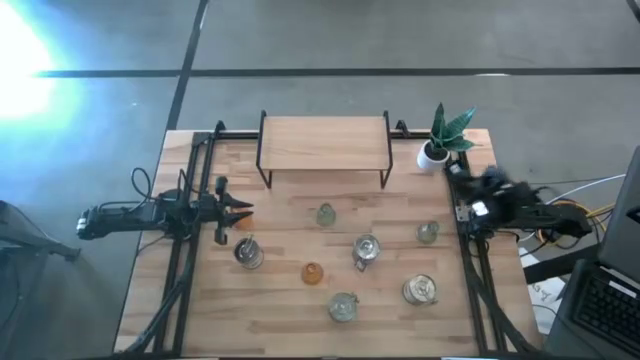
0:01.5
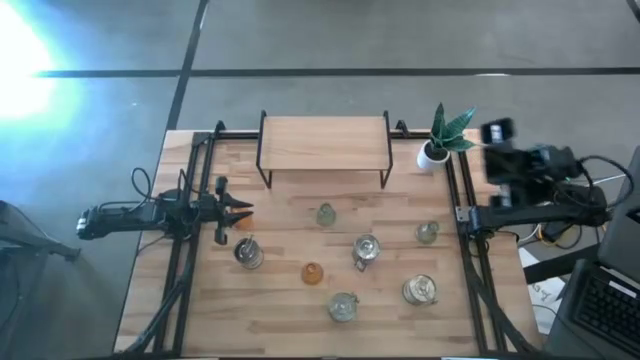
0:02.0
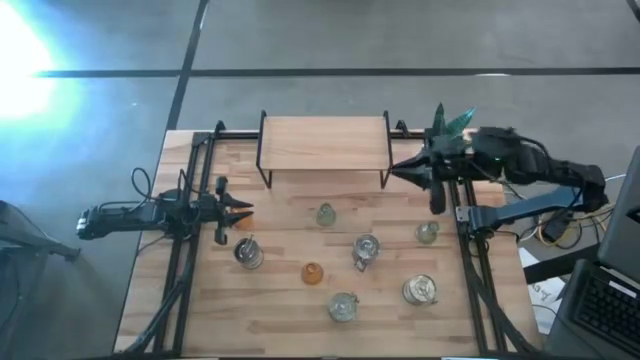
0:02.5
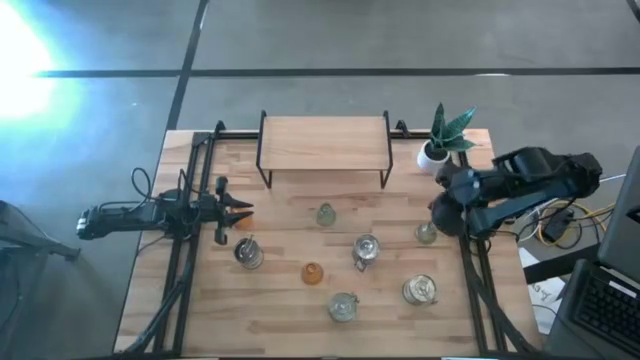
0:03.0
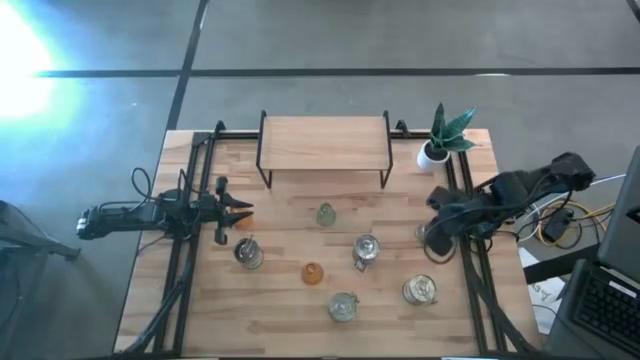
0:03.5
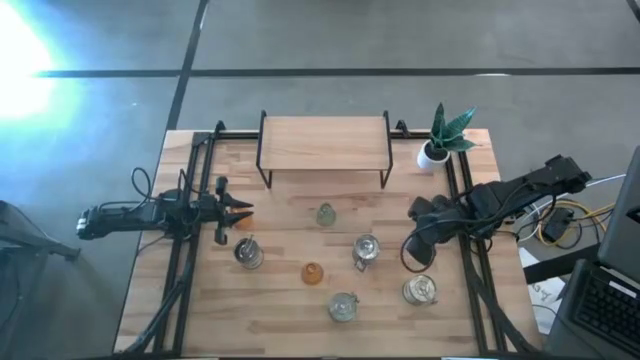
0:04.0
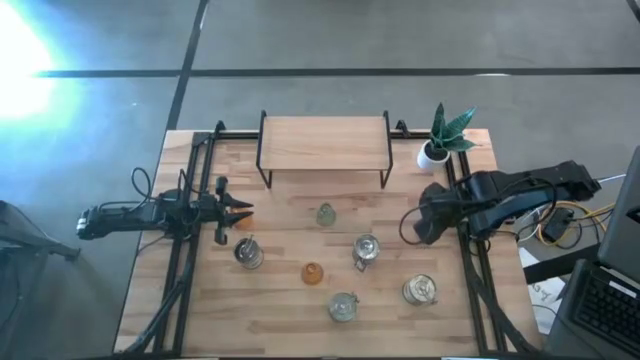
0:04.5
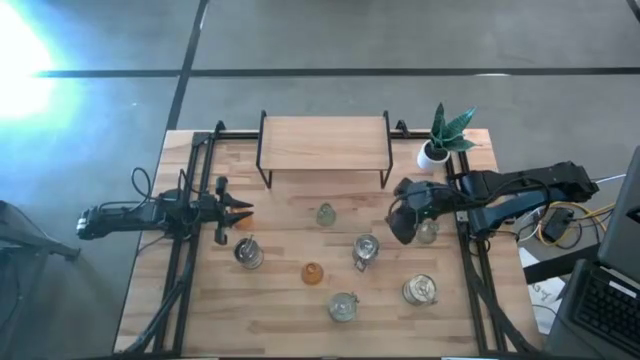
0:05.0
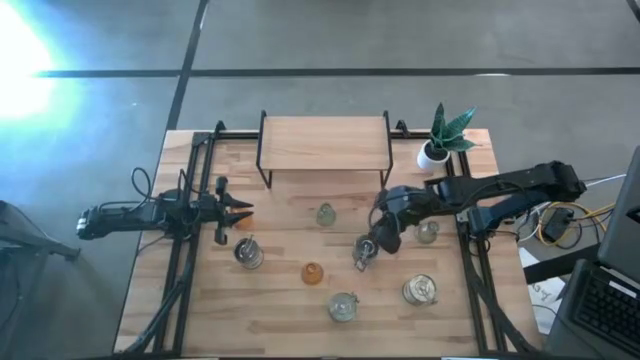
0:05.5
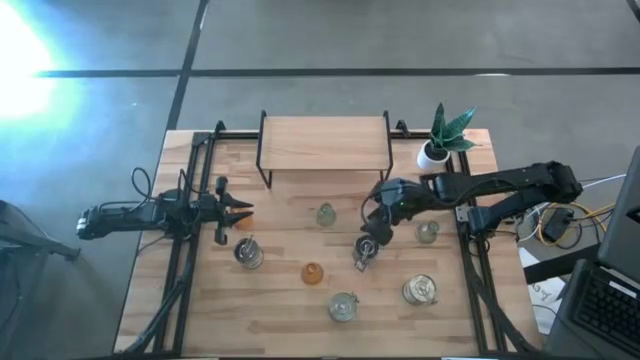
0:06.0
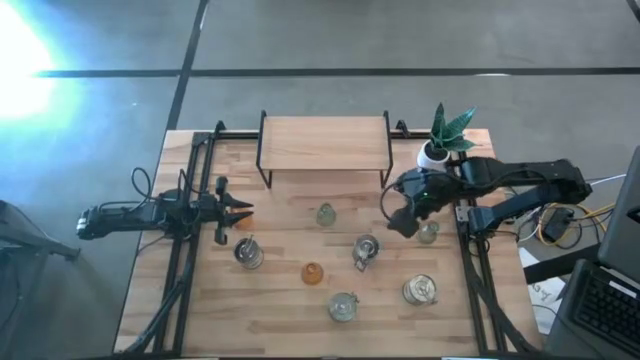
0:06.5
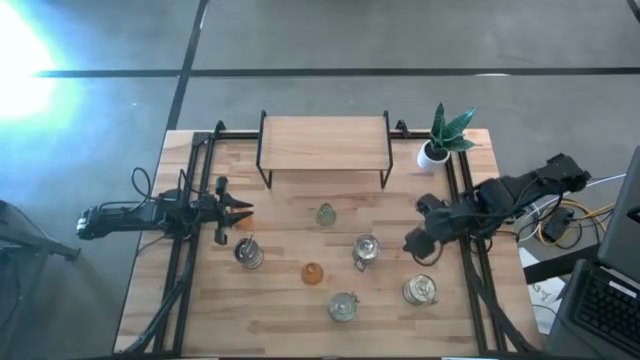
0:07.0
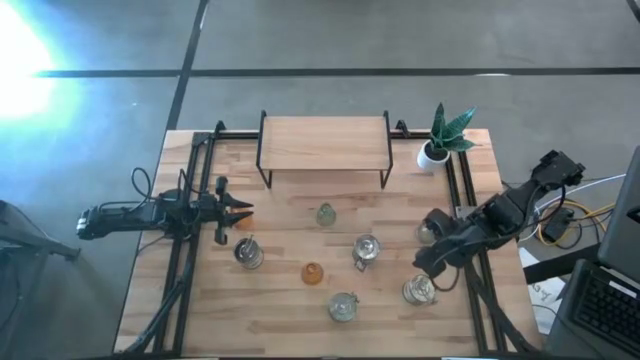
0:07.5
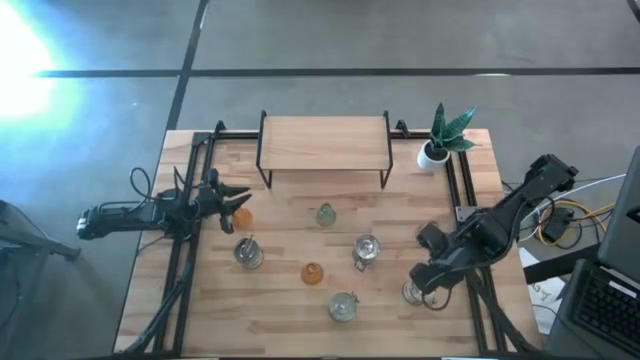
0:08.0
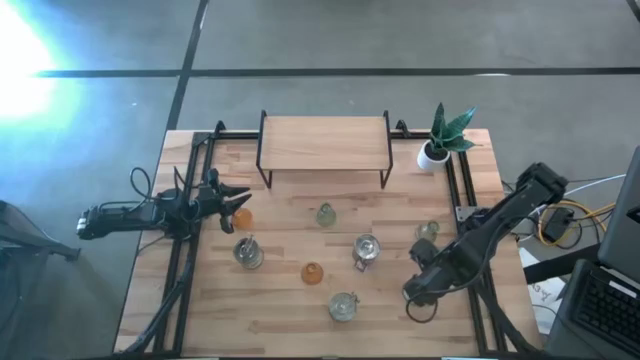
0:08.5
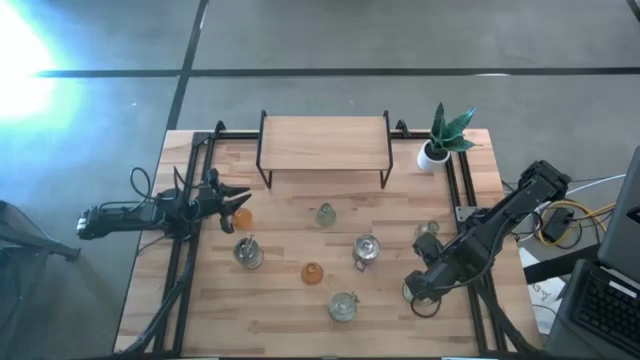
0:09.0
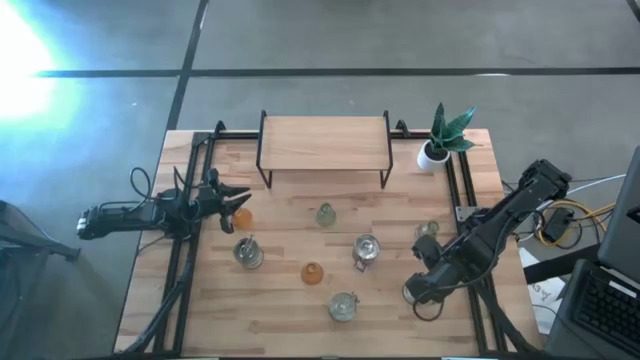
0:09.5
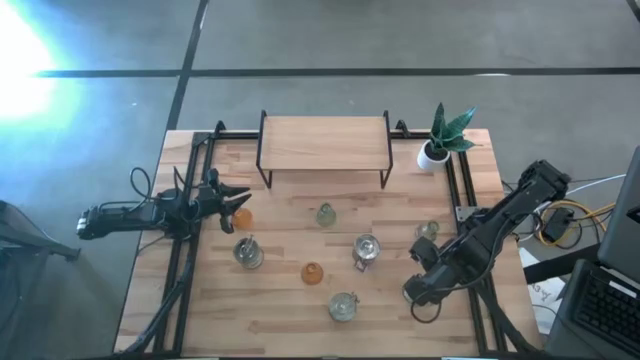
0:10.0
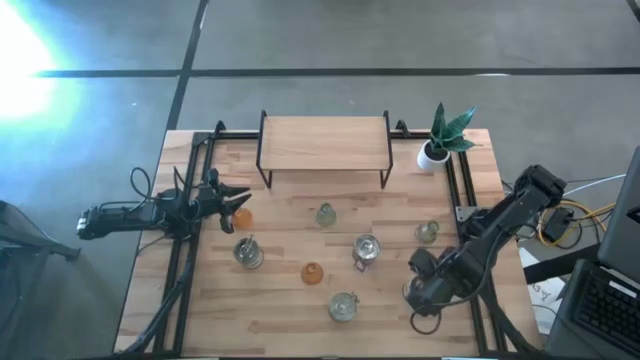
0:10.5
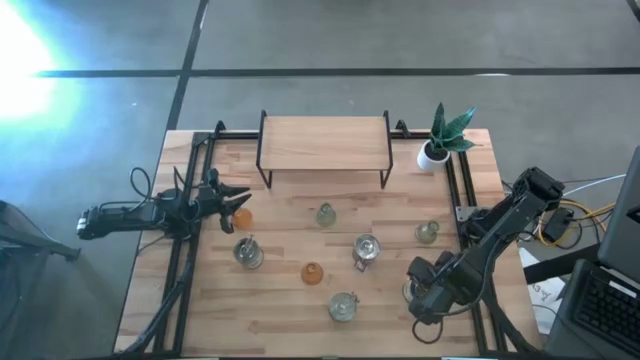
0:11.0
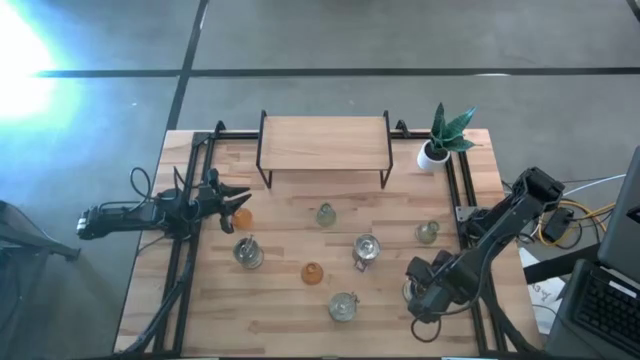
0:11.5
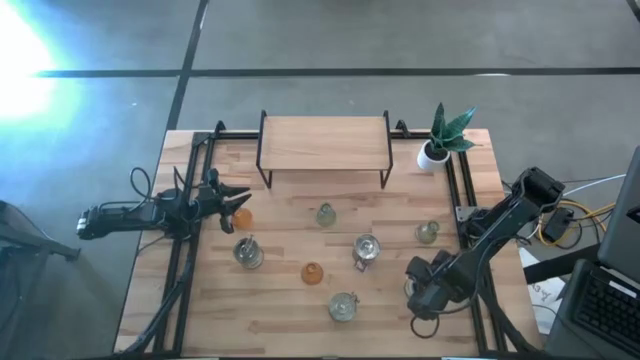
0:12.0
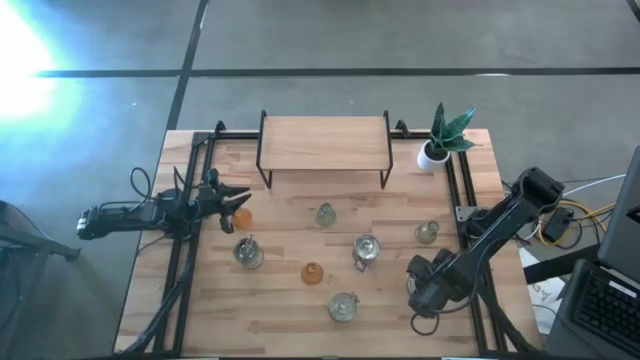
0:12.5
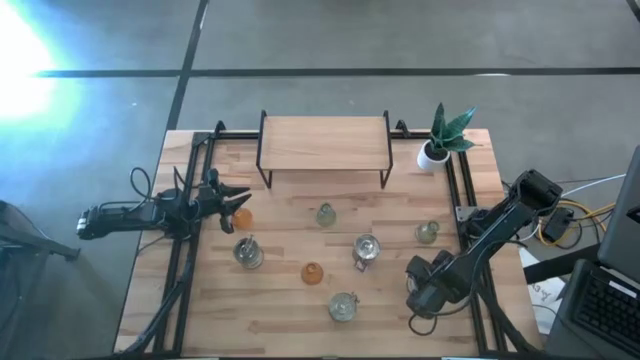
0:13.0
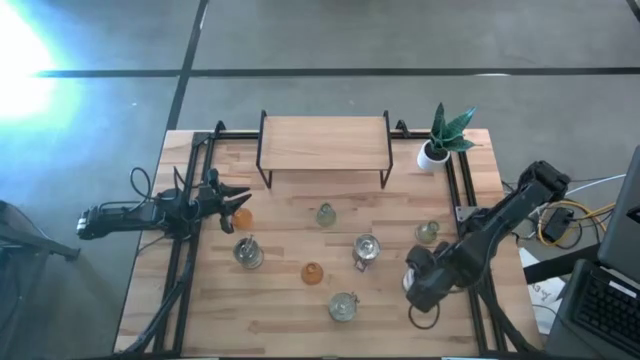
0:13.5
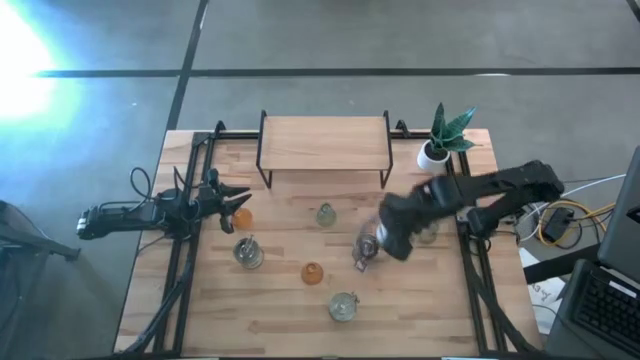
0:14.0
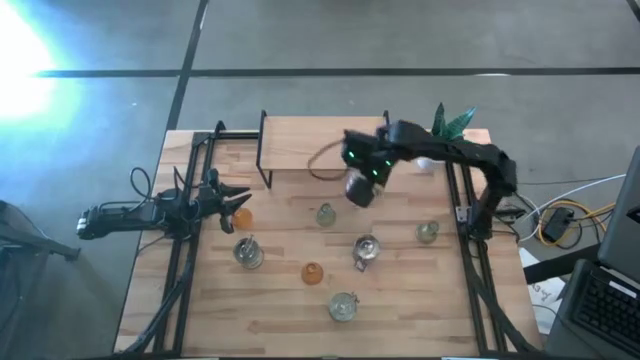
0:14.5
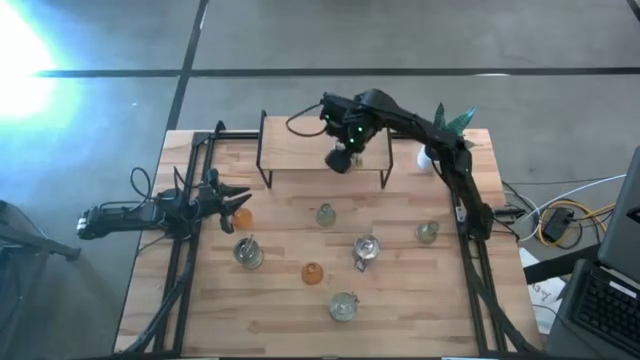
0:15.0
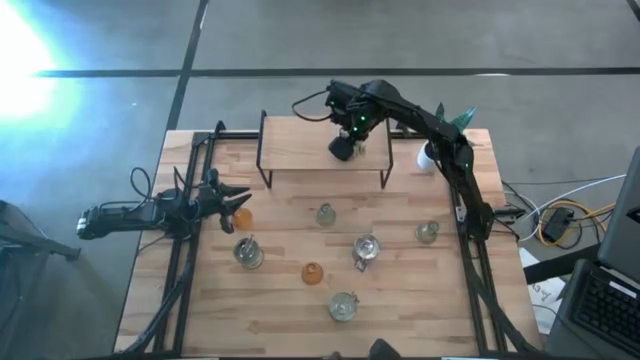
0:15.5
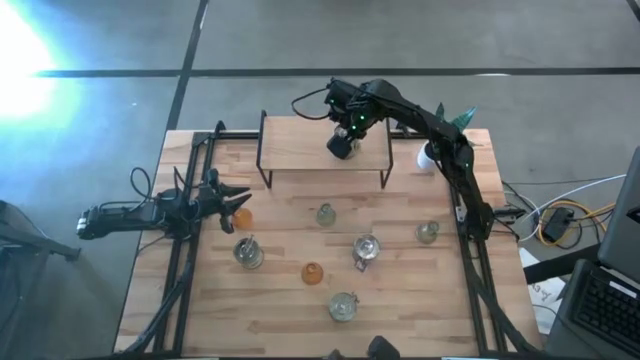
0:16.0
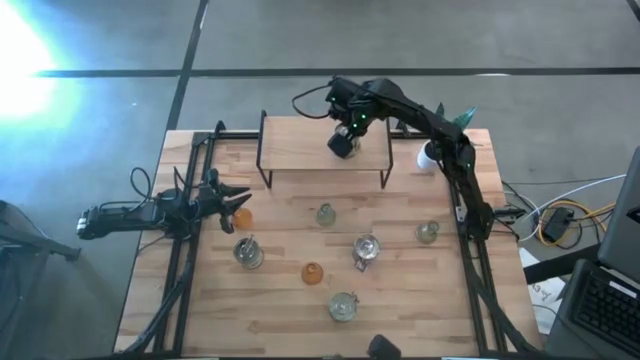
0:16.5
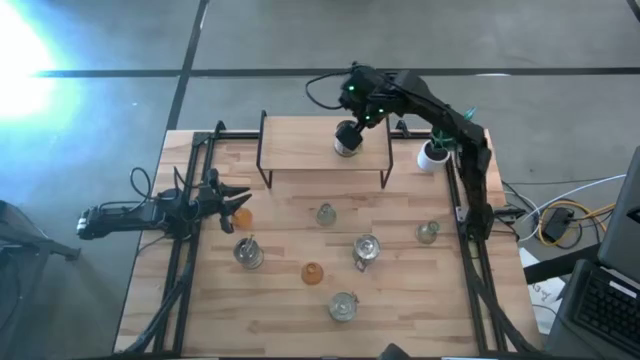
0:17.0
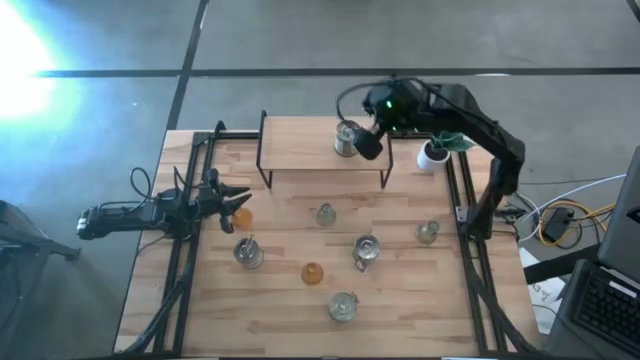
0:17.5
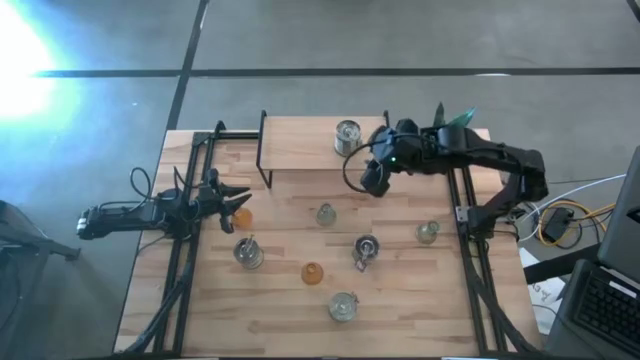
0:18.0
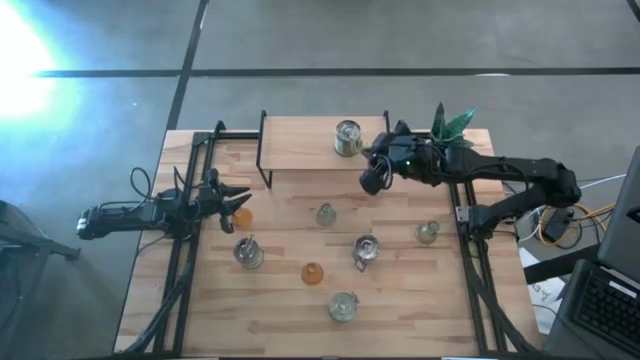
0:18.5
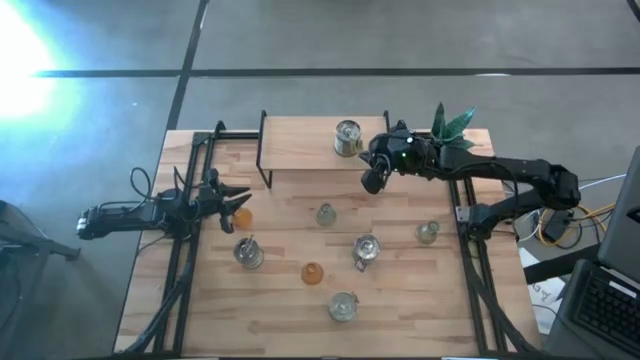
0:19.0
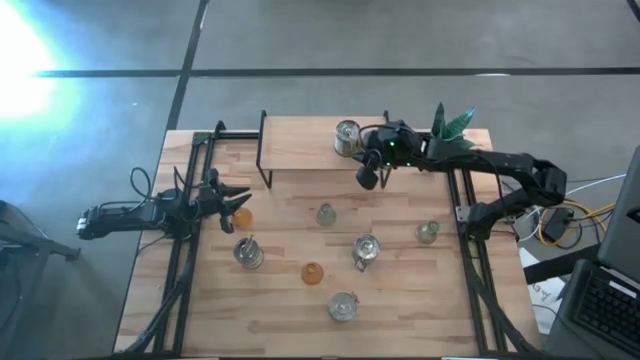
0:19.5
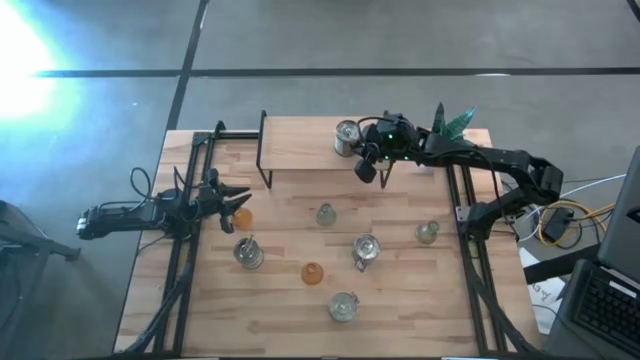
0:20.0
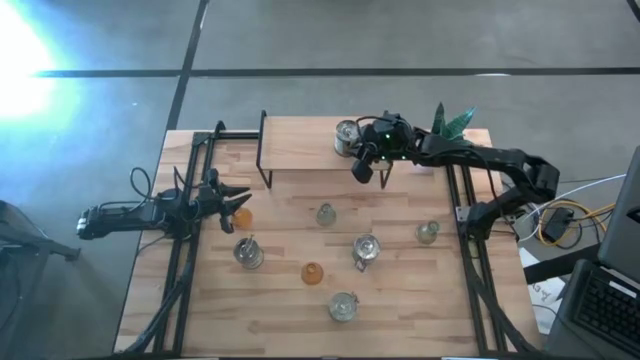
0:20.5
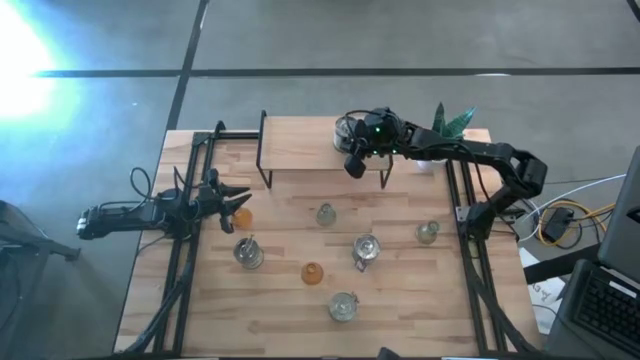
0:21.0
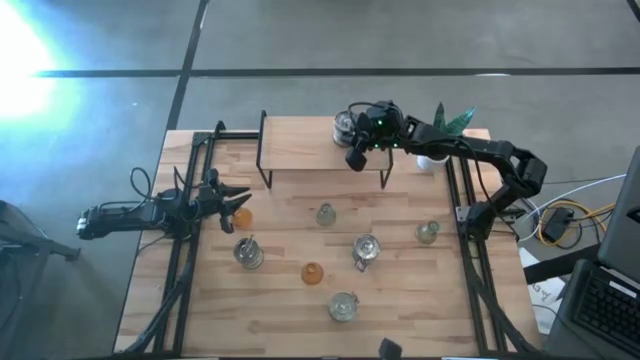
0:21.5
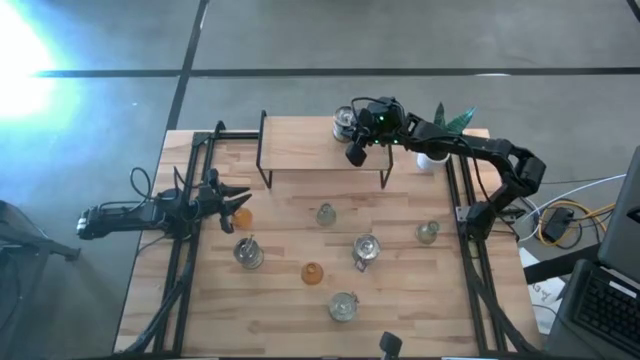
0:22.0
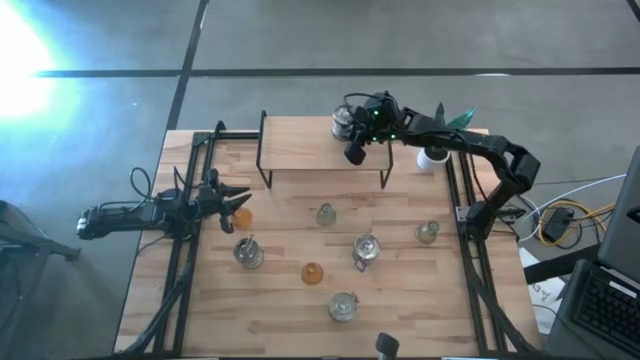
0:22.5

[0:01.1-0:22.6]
Task: Pick & Place candle stick holders
Put the right green scented candle on the shelf
